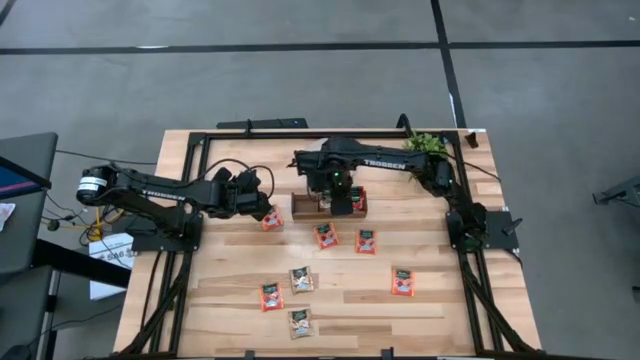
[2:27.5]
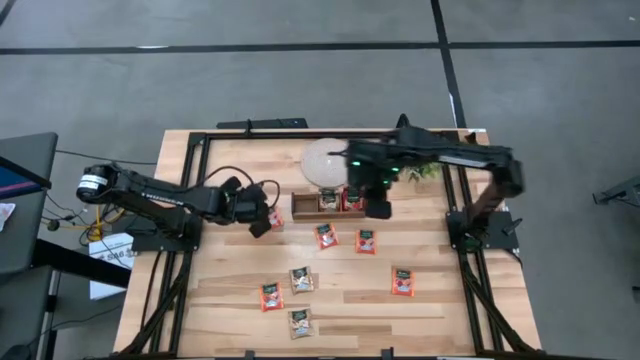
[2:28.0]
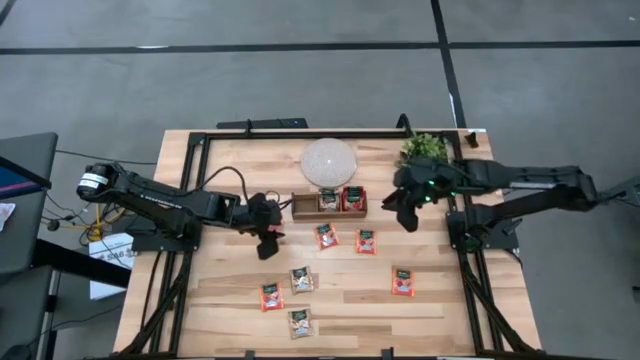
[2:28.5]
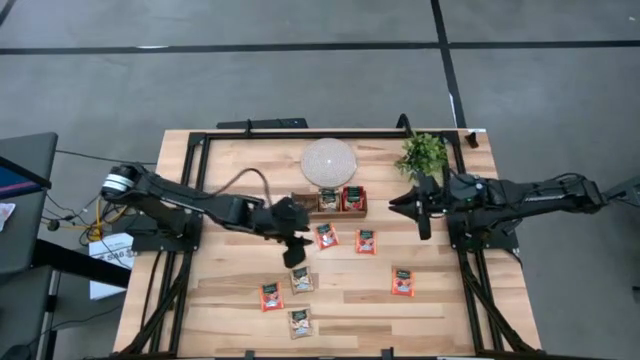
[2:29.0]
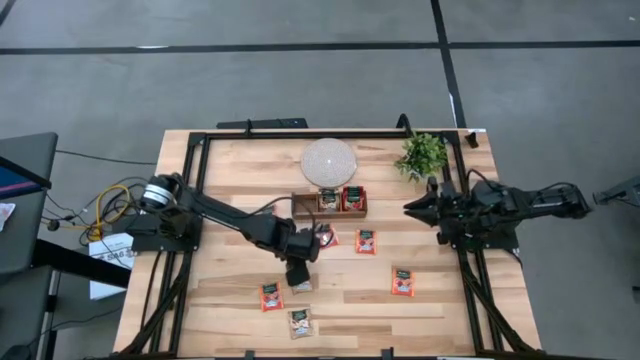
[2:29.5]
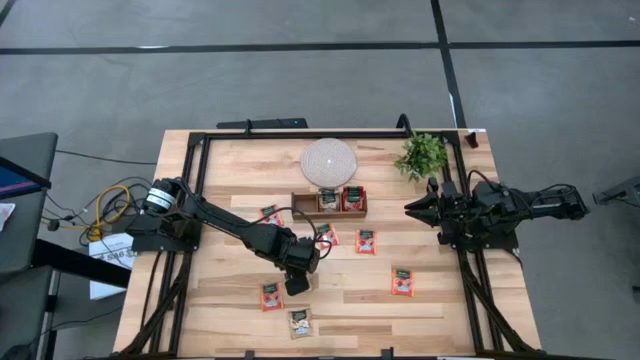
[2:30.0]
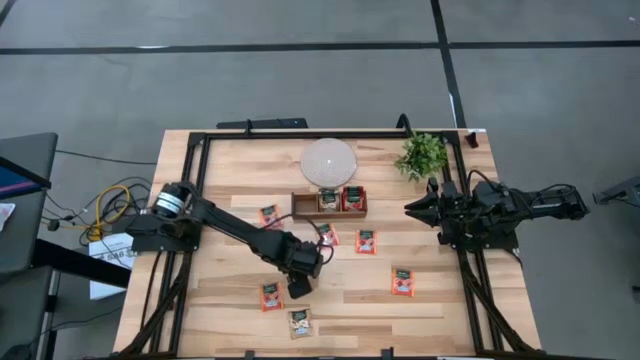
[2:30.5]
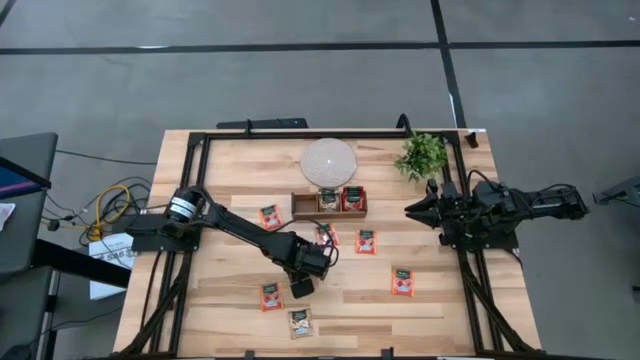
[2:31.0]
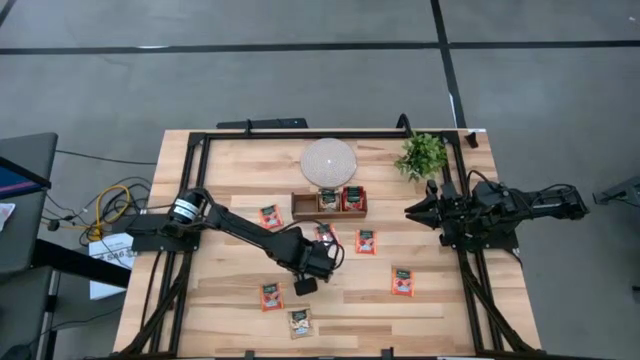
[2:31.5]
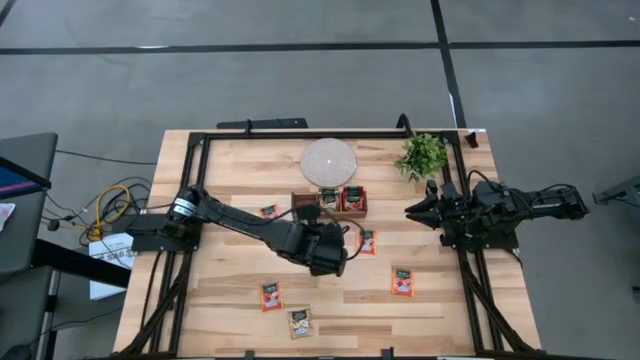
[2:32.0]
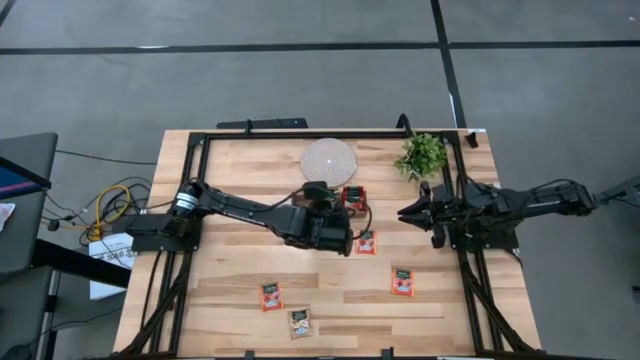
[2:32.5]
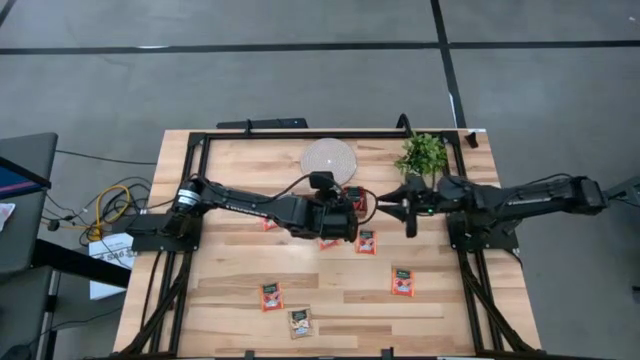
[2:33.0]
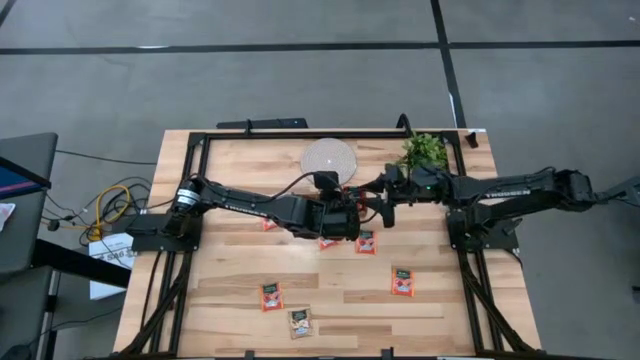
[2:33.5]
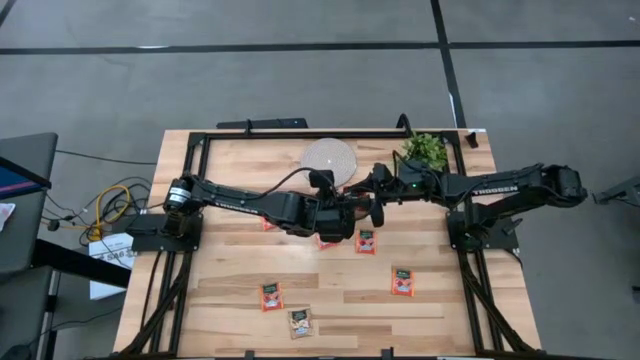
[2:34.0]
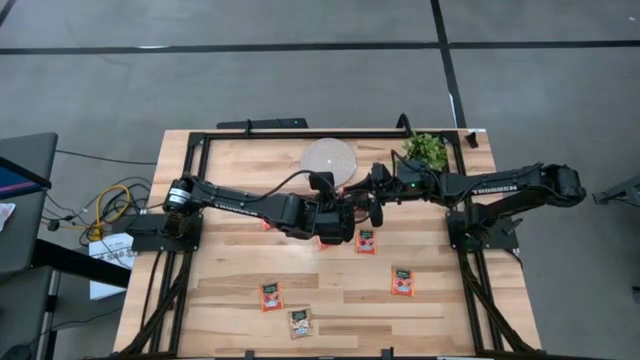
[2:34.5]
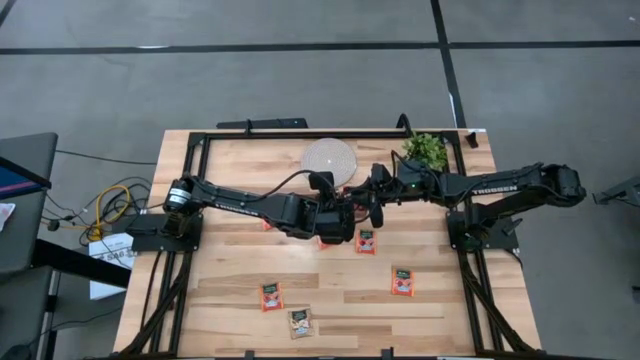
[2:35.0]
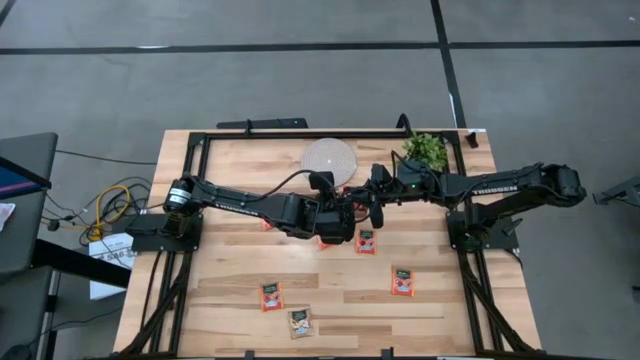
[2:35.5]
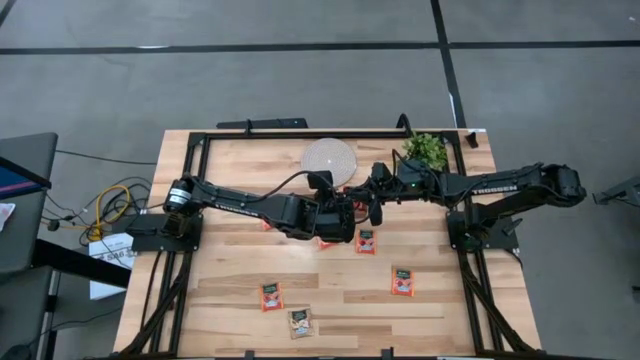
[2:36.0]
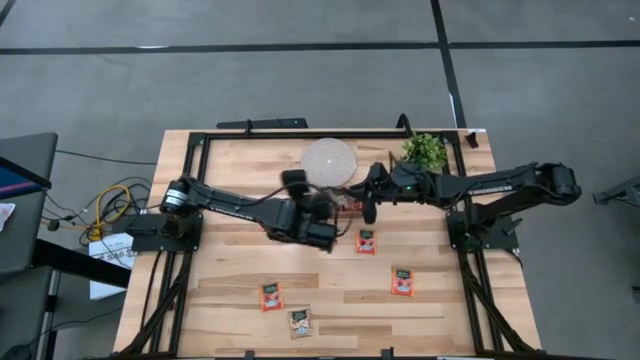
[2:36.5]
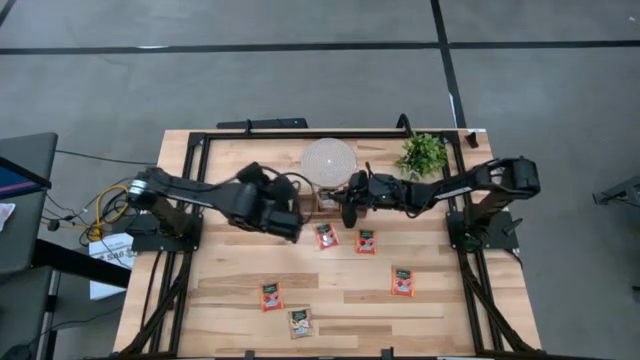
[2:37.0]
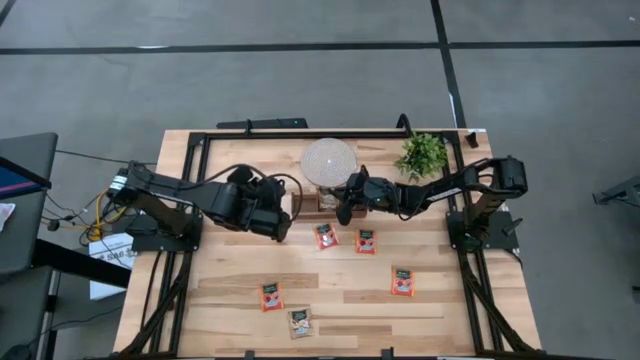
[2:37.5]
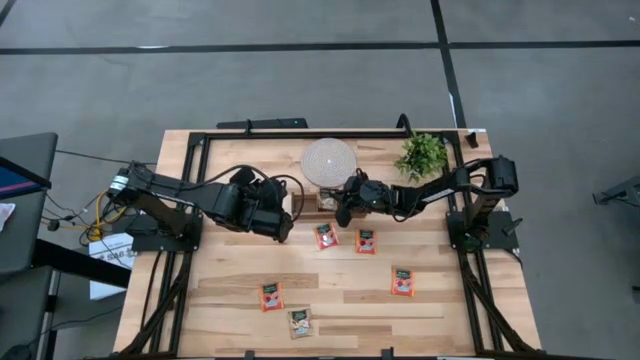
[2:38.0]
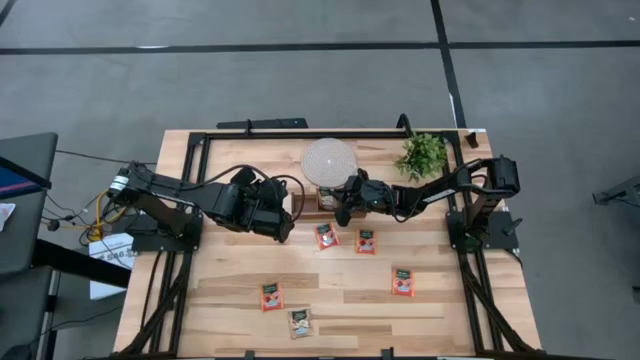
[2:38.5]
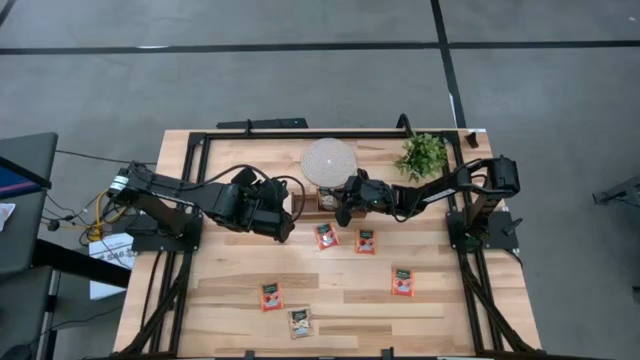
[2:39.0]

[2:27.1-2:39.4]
Task: Pick & Place Tea
Put the top brown tea bag into the middle slot of the wooden organizer

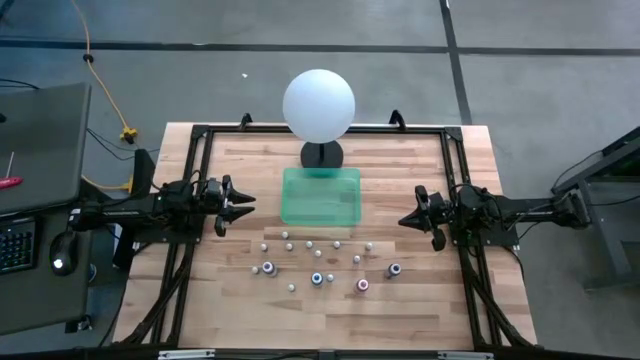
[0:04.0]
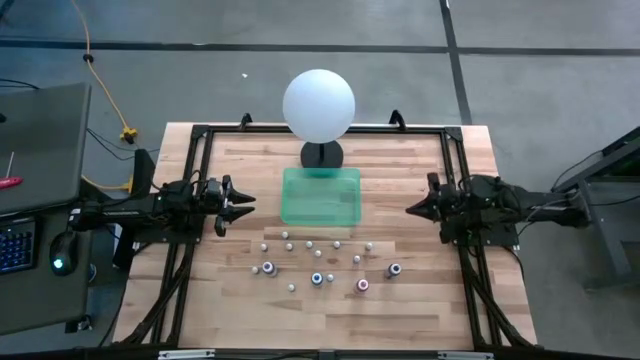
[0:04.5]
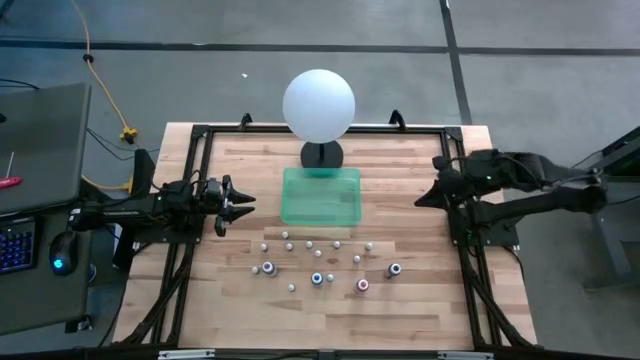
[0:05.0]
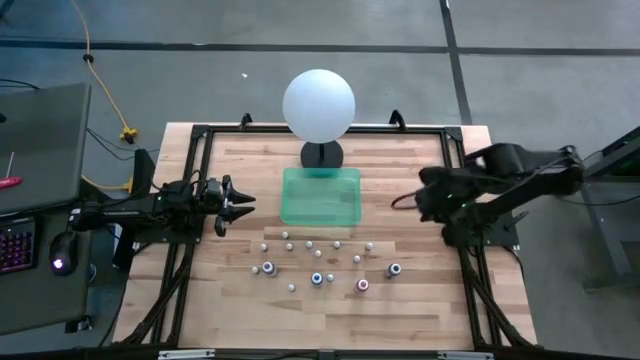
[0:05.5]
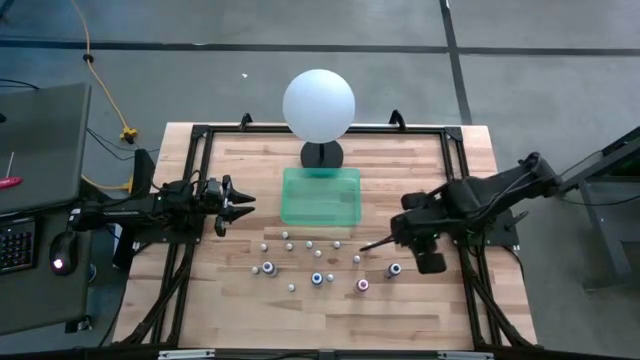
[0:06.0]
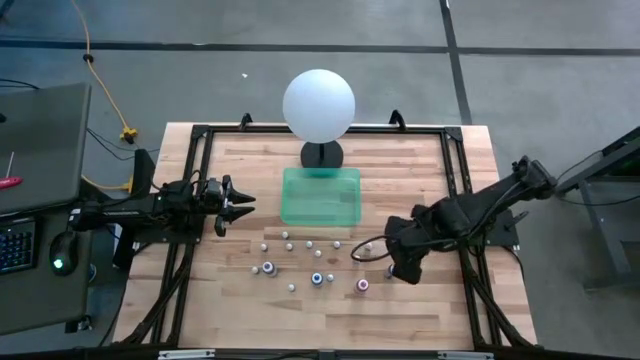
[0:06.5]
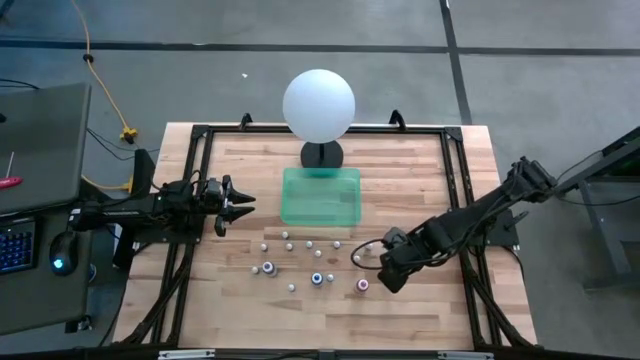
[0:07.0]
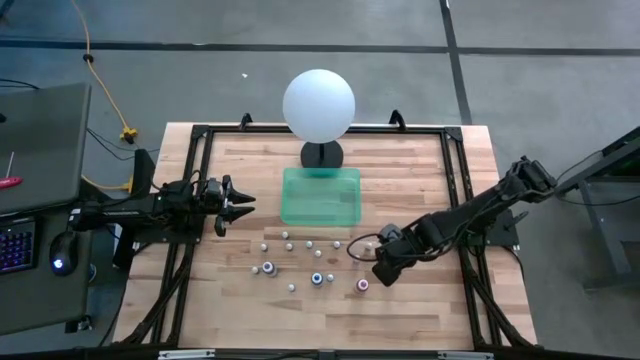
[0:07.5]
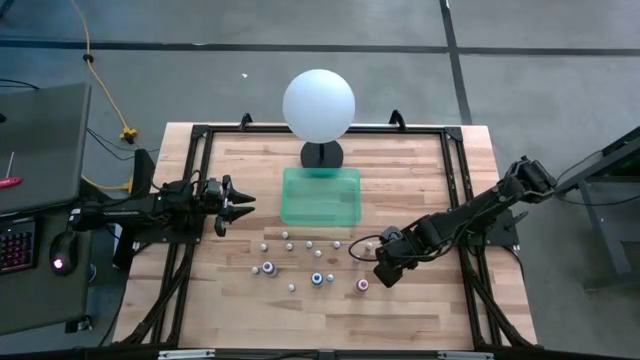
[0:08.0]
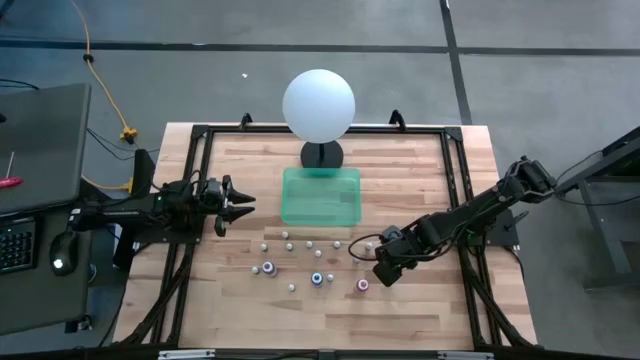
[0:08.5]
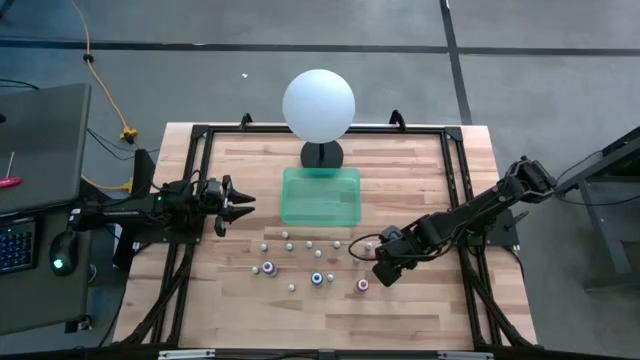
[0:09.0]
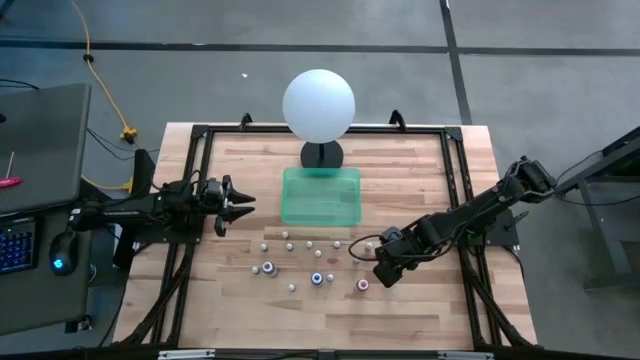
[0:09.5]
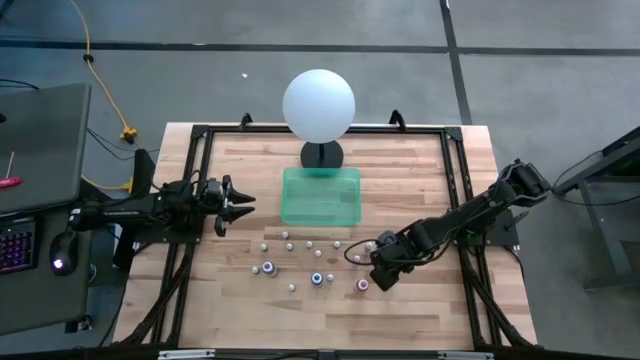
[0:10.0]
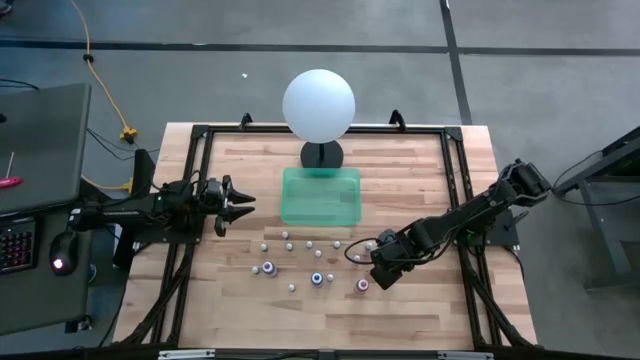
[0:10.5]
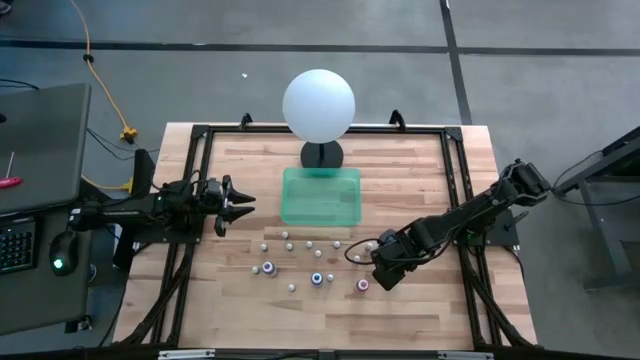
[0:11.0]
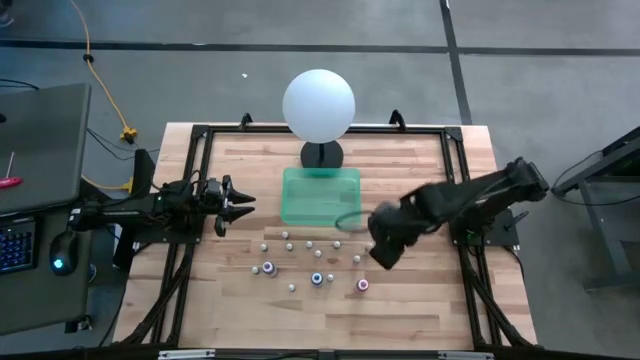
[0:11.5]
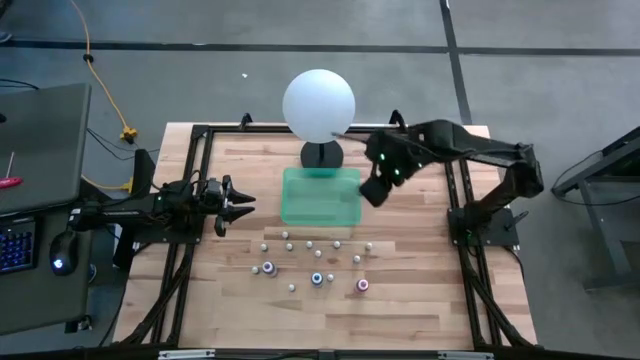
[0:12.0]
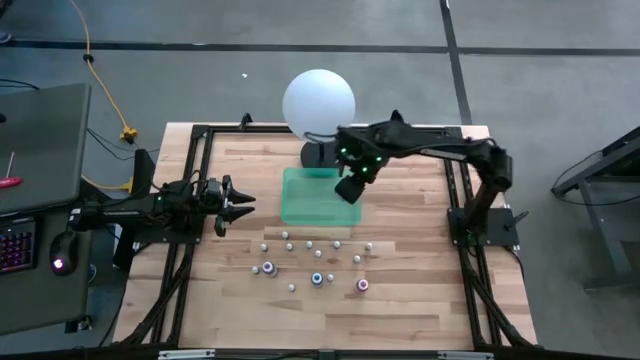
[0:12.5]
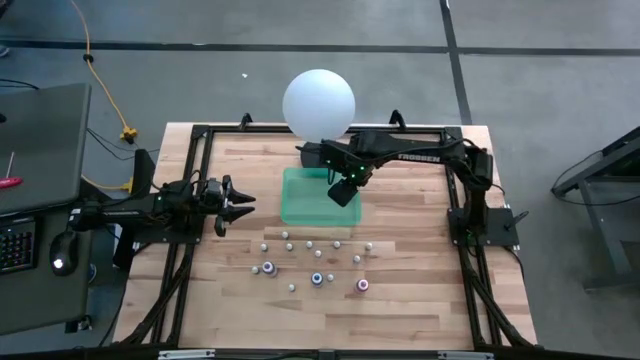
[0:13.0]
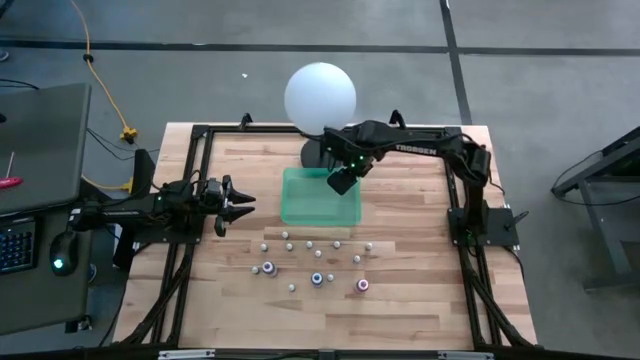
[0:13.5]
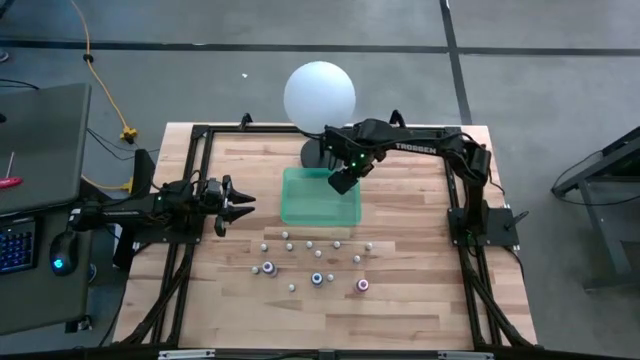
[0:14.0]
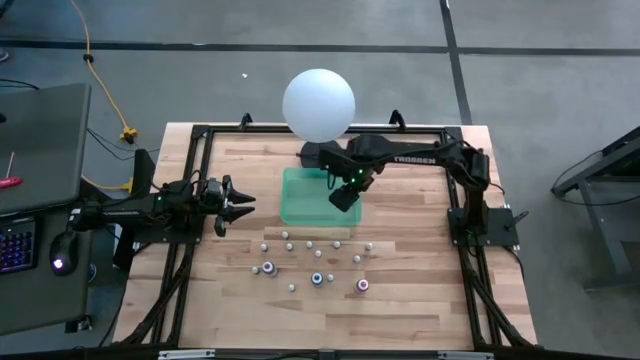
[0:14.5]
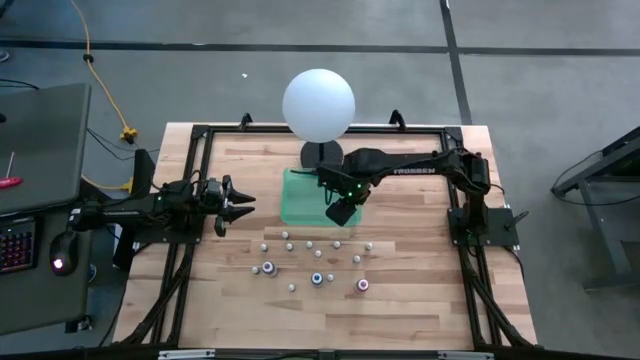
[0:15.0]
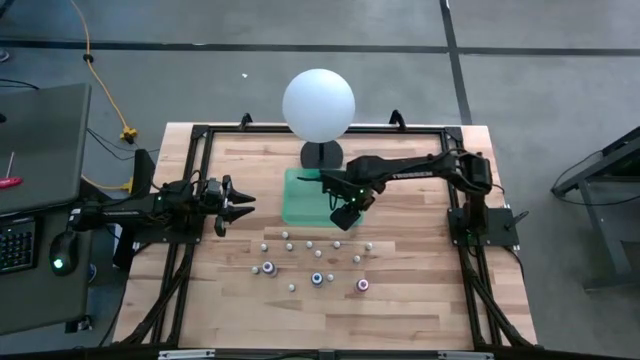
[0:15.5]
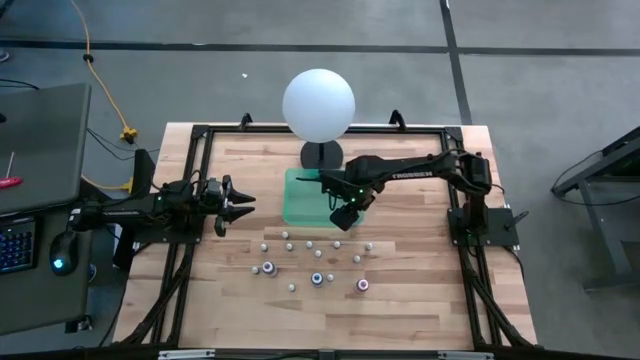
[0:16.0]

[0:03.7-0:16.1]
Task: Pick & Place food coloring
Put the large black food coloring bottle into the bin
